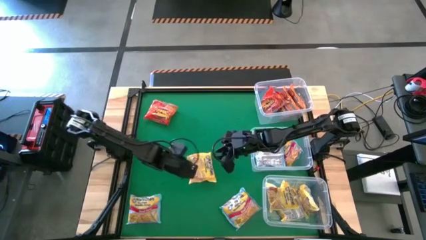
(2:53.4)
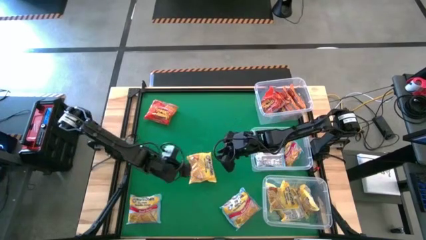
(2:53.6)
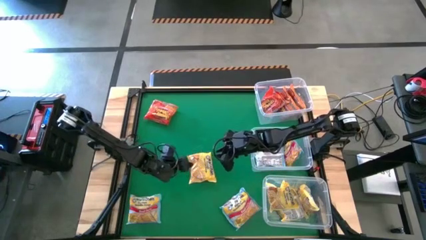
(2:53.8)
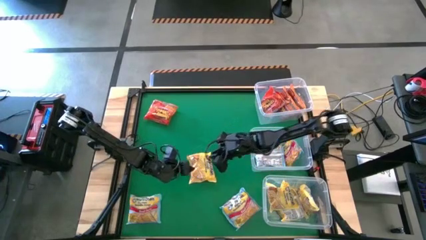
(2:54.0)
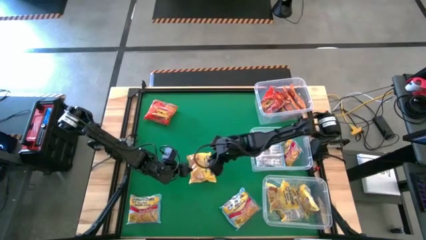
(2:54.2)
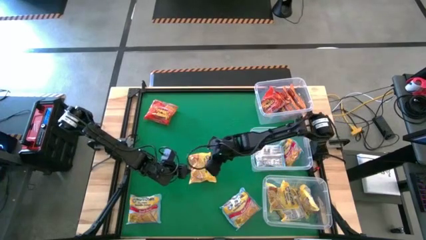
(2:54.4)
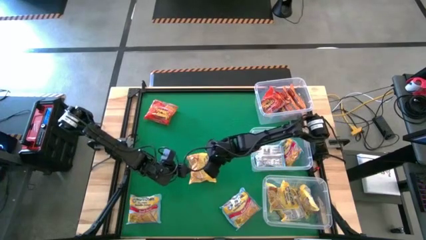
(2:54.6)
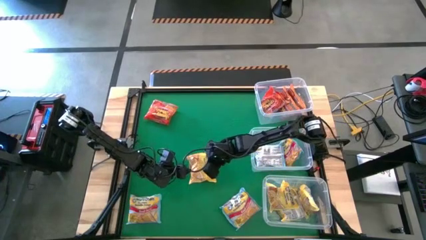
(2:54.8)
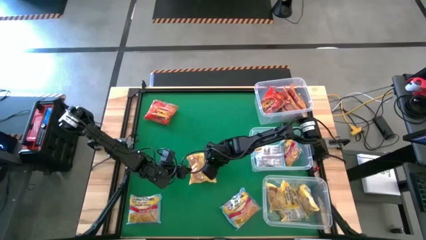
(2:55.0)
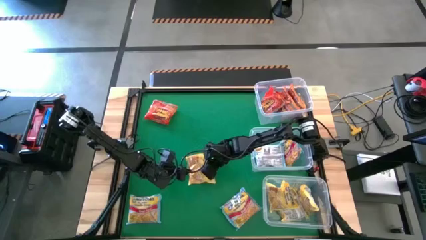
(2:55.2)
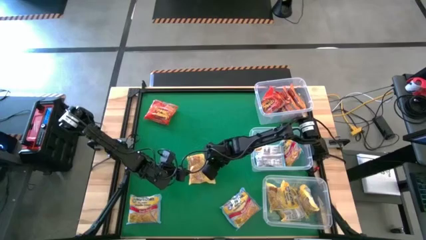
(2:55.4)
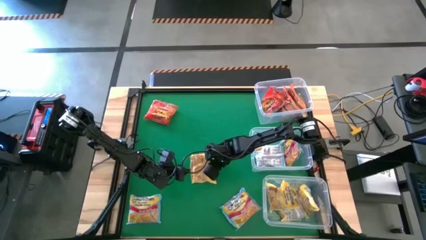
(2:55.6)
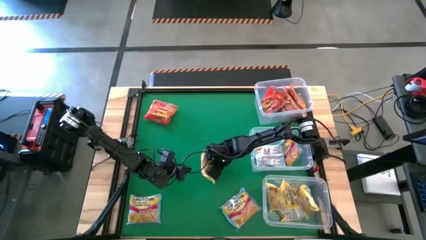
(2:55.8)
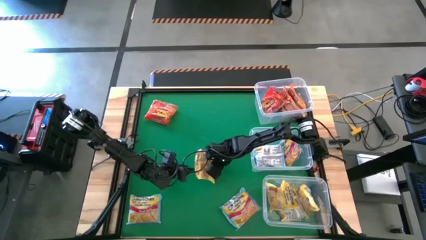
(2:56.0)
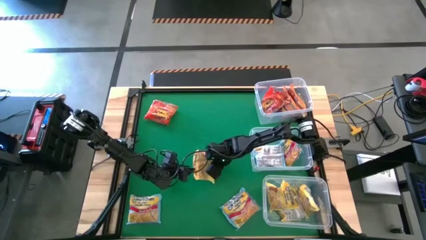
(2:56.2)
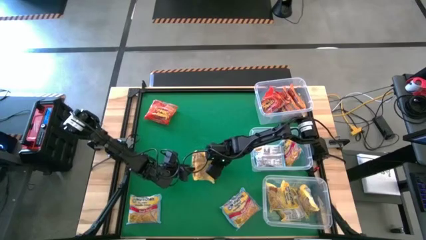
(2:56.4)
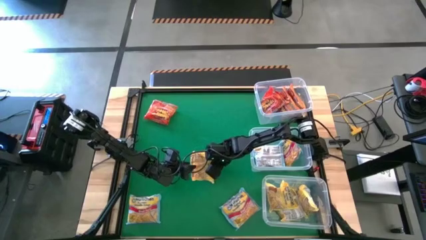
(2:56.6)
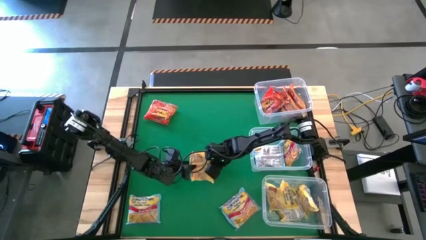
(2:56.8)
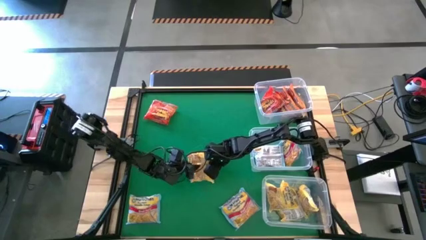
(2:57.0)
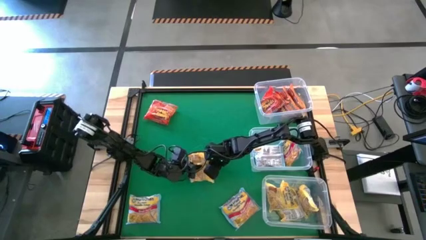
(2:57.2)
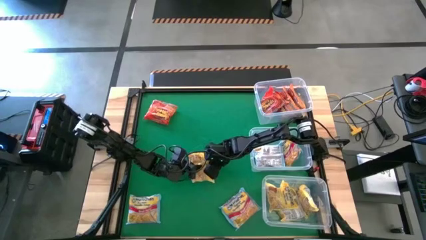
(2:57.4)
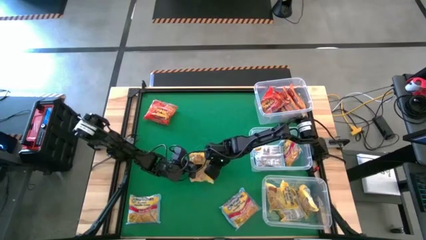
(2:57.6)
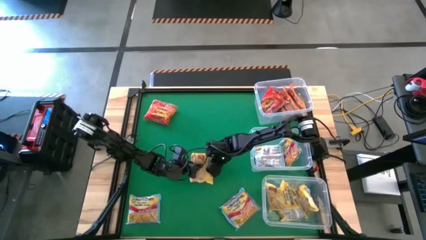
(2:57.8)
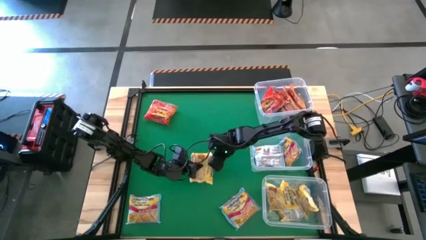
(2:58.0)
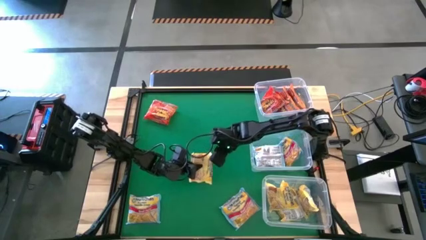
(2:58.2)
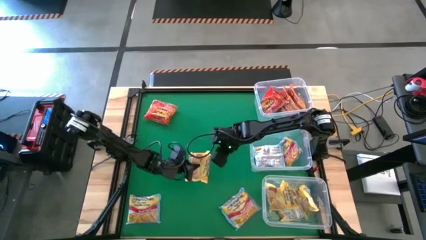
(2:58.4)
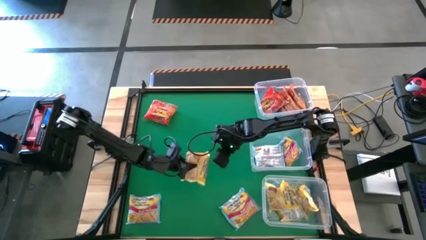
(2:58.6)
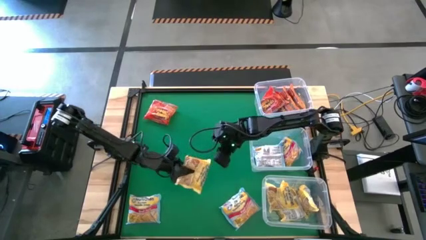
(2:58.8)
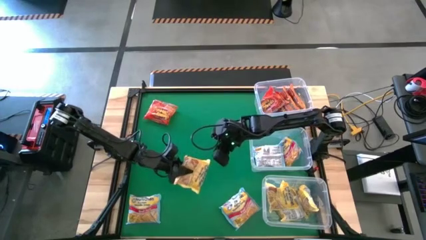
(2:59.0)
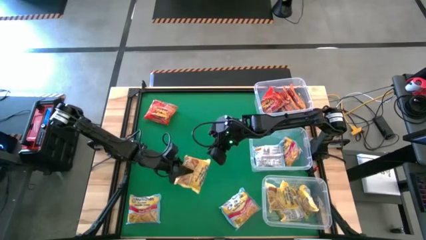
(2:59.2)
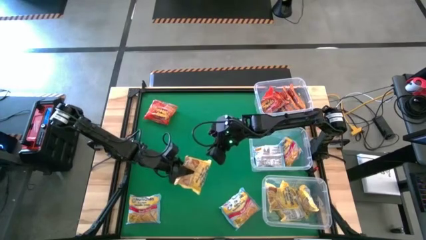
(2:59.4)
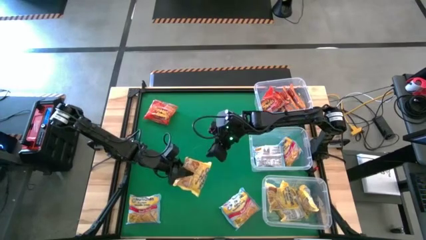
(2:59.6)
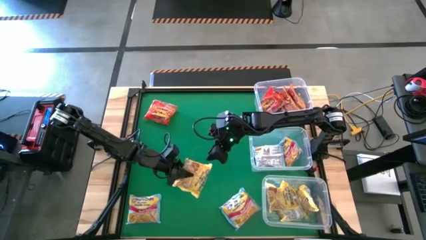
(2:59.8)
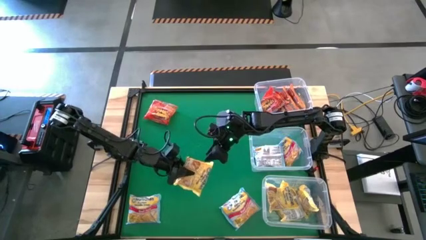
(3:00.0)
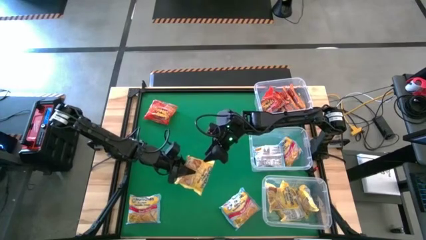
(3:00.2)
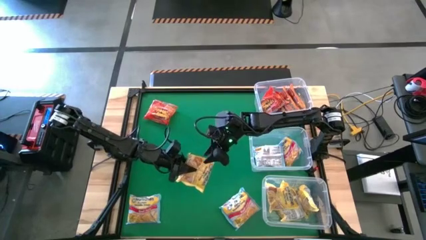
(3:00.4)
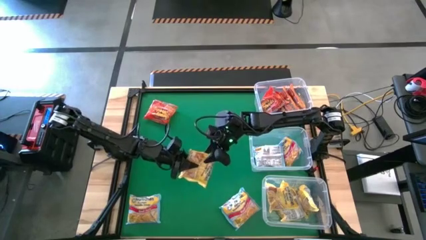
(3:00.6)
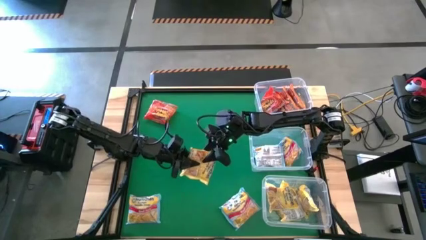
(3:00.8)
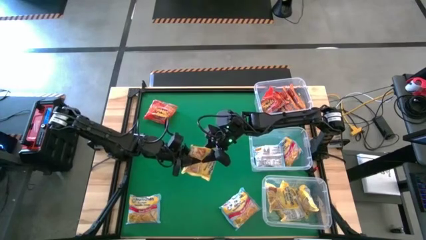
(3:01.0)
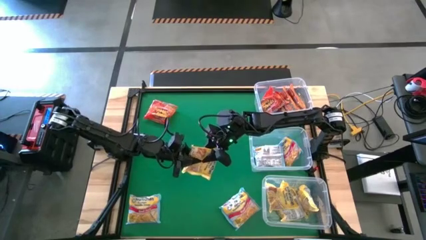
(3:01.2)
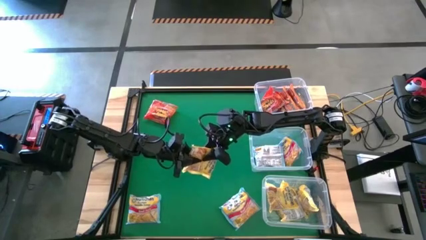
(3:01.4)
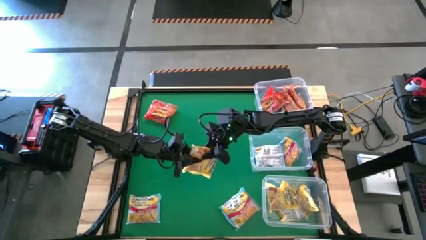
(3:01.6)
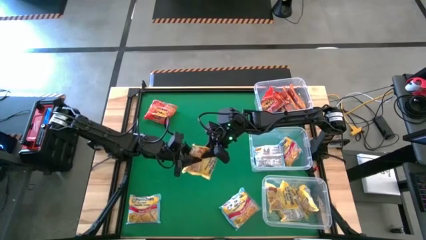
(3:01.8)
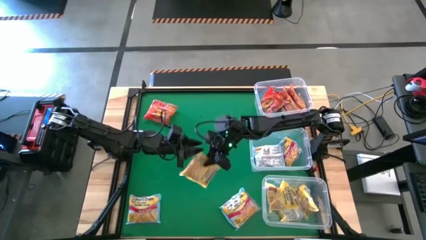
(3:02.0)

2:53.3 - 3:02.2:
Task: Sort Maruchan noodles
Put the center yellow noodle pack into the bottom transparent bin

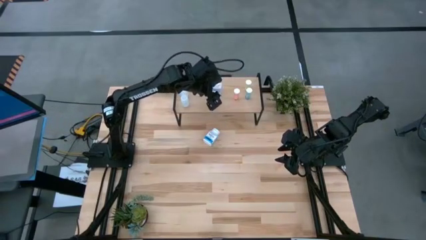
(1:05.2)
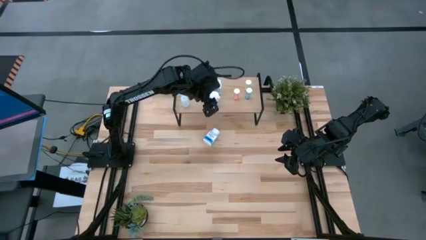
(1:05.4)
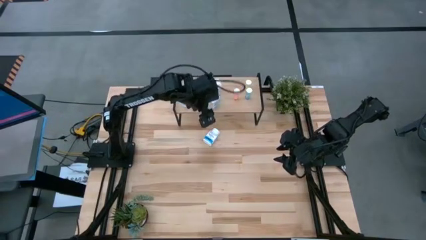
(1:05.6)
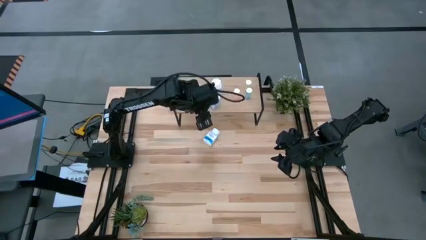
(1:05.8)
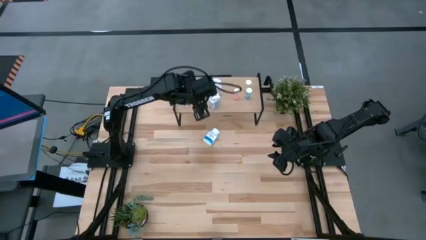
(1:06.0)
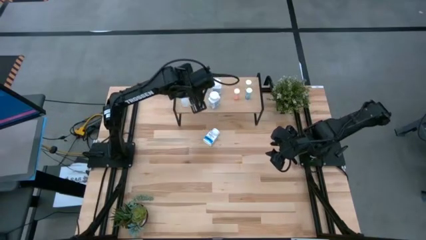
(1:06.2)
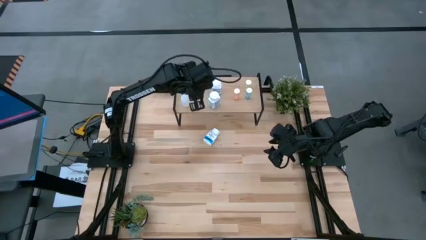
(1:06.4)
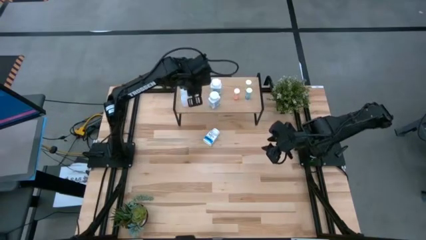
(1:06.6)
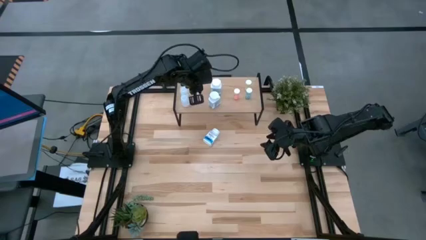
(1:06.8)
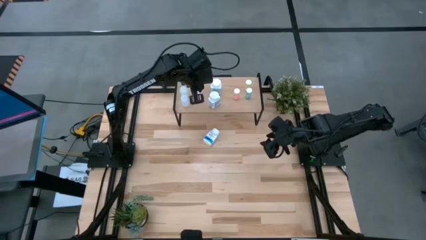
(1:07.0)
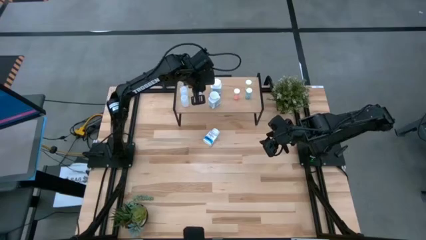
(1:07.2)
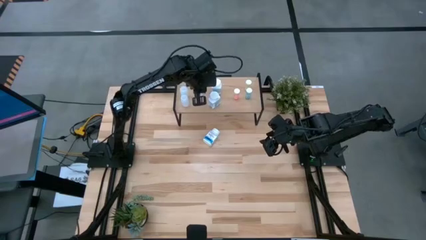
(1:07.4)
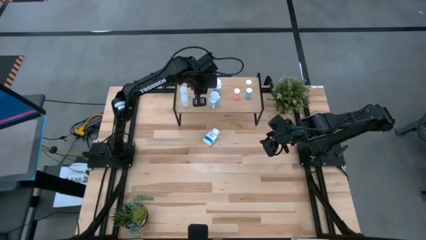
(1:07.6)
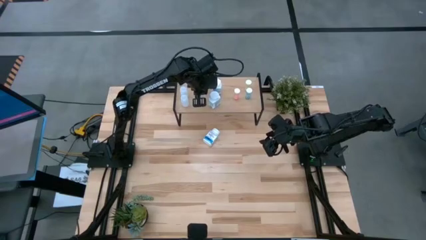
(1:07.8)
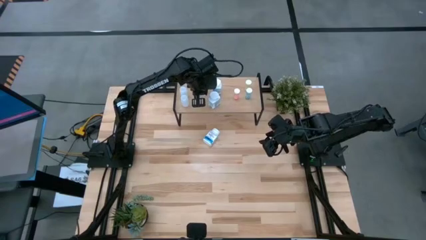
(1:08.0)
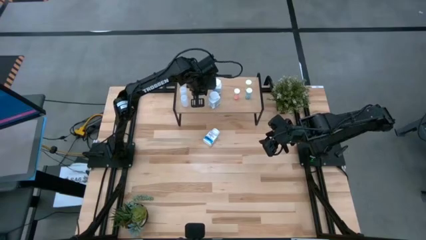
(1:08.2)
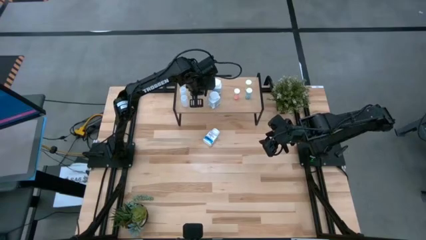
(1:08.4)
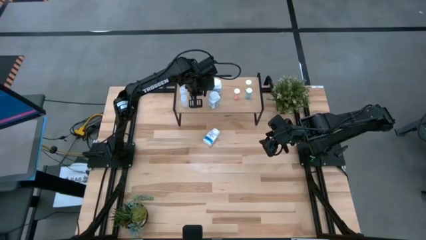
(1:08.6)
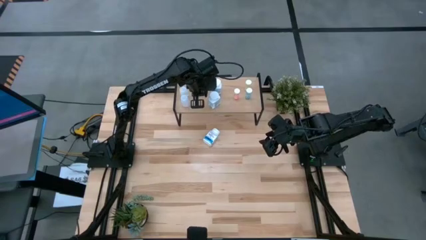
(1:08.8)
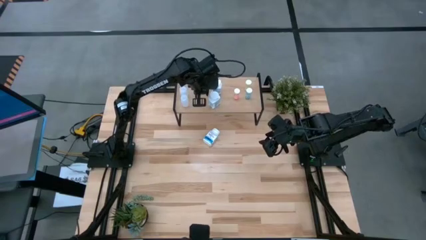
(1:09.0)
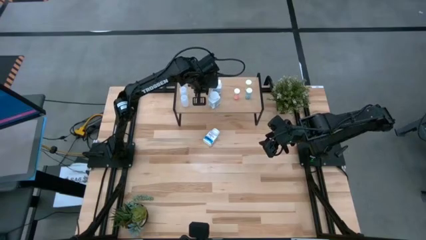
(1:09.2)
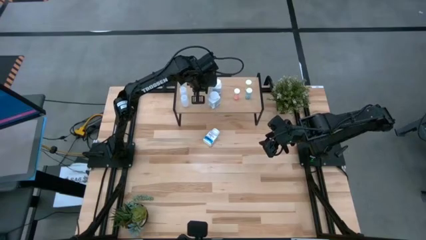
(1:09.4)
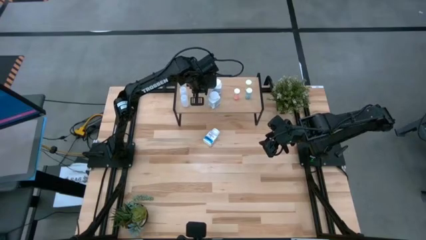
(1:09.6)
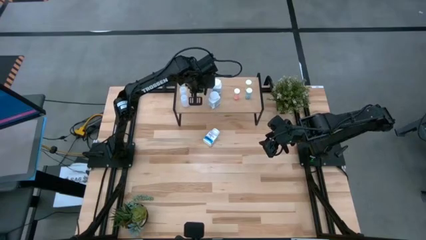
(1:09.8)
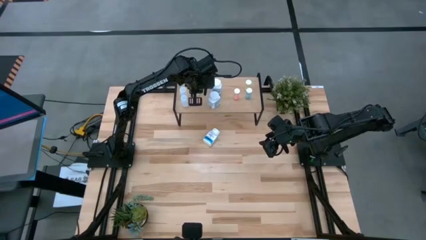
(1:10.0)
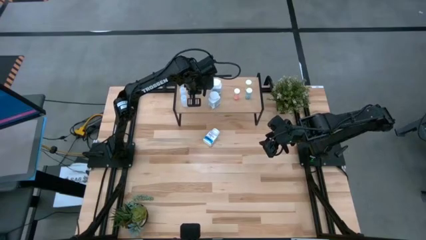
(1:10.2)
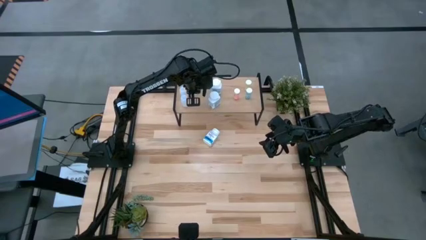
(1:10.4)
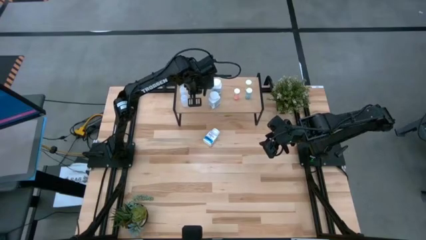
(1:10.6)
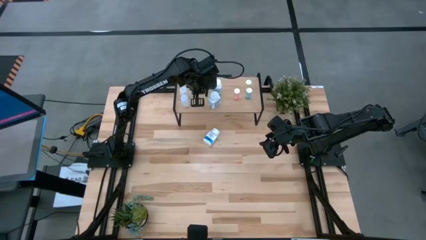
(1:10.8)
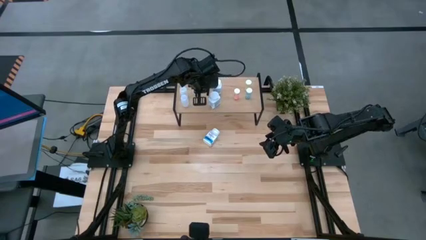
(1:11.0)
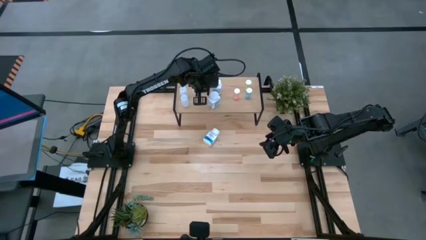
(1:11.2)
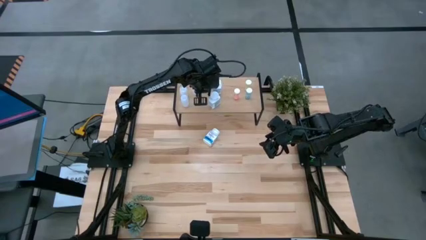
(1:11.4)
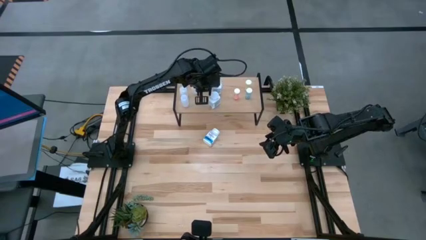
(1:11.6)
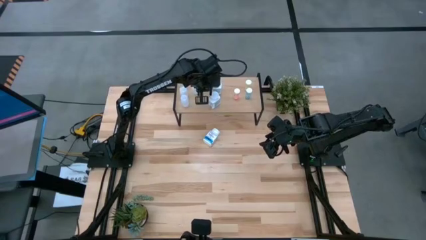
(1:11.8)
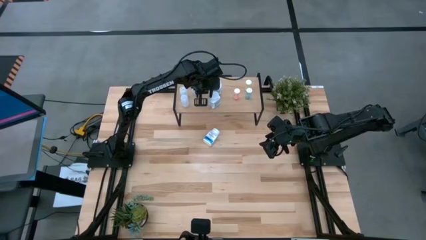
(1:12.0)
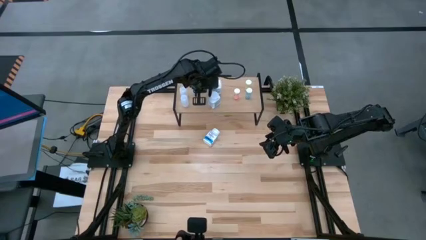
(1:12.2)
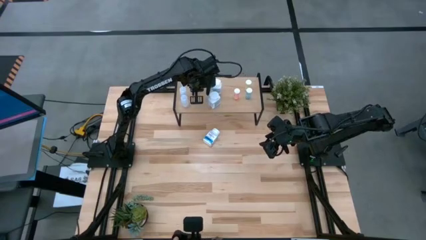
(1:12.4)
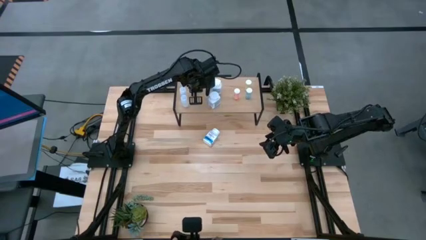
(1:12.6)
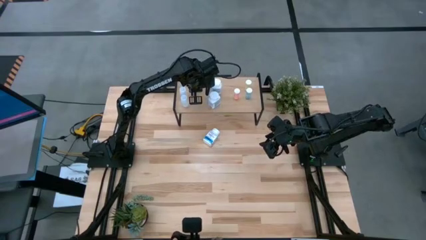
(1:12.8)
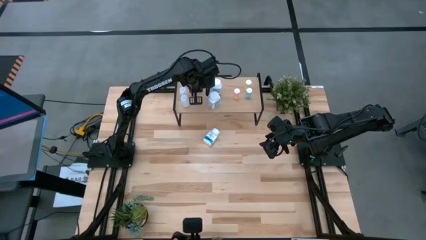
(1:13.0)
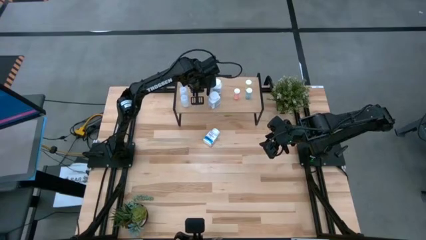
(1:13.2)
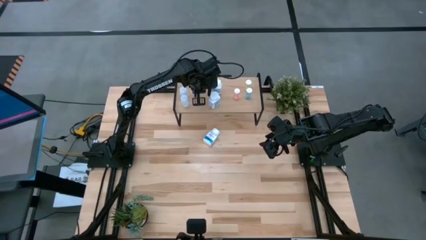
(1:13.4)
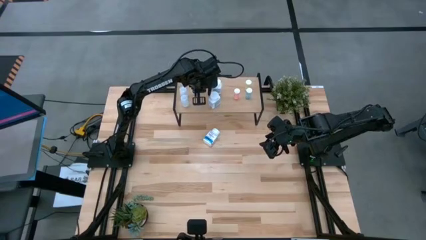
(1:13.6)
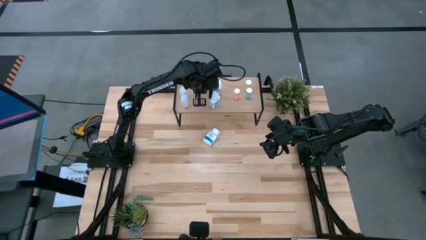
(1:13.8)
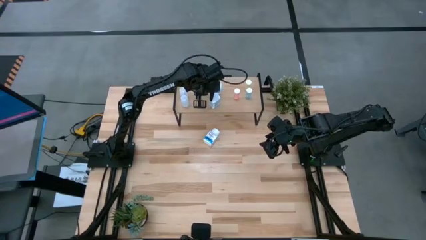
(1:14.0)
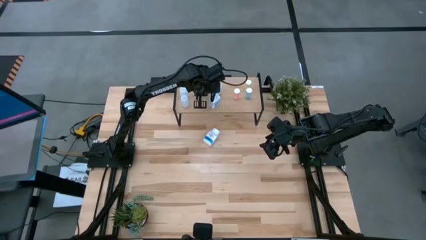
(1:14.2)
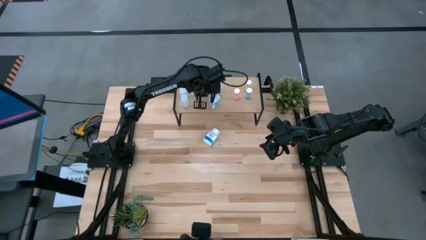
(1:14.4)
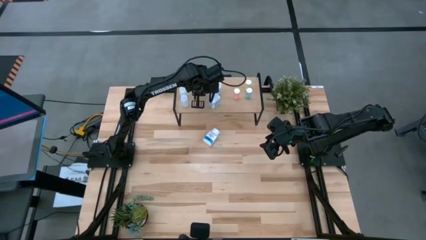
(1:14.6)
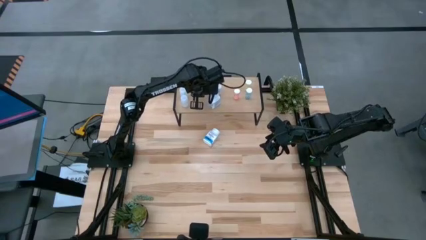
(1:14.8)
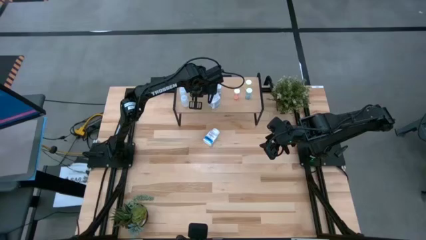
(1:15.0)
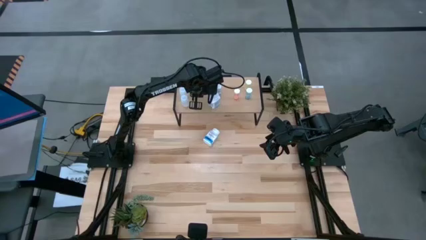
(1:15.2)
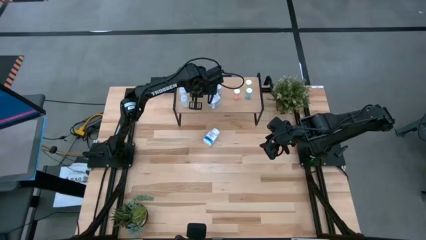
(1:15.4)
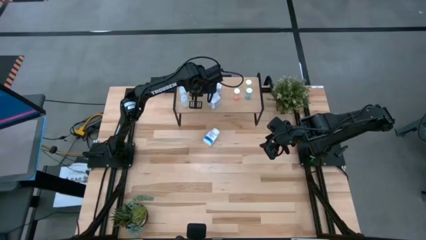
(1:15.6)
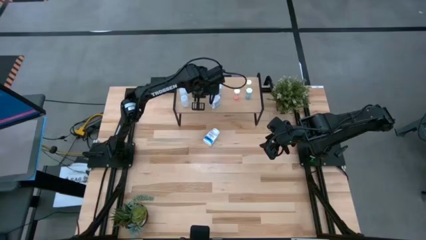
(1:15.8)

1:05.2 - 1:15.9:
Task: Pick and place medicine bottles onto shelf by color
Adjust the transparent medicine bottle on the shelf
